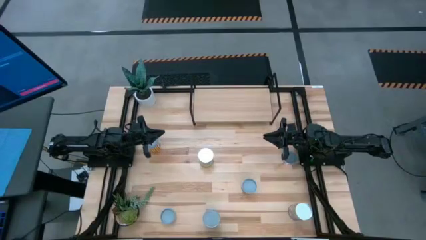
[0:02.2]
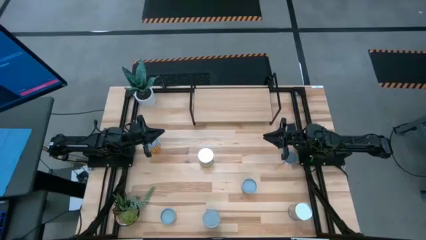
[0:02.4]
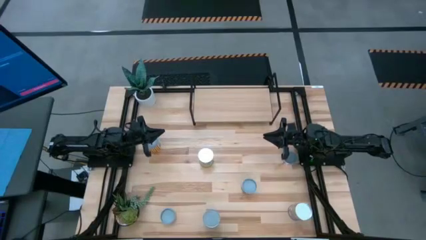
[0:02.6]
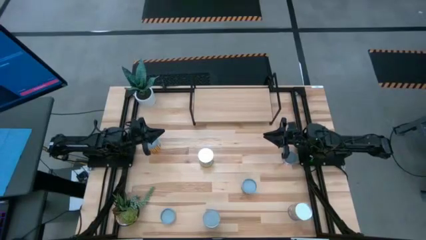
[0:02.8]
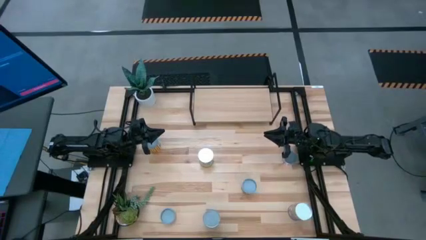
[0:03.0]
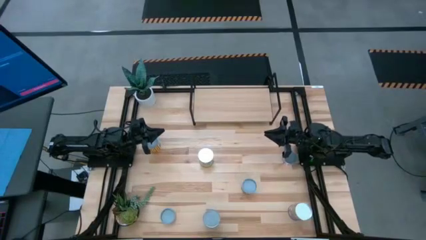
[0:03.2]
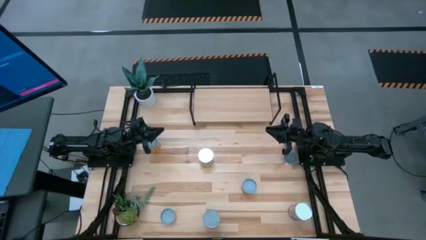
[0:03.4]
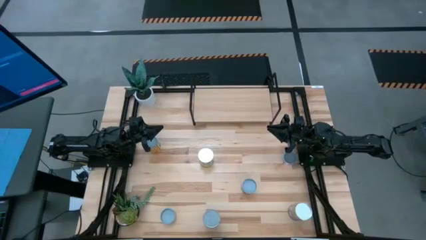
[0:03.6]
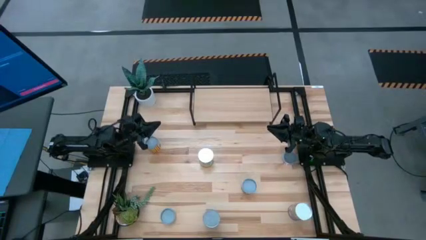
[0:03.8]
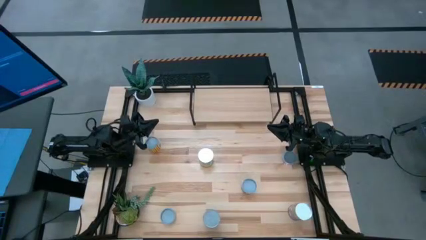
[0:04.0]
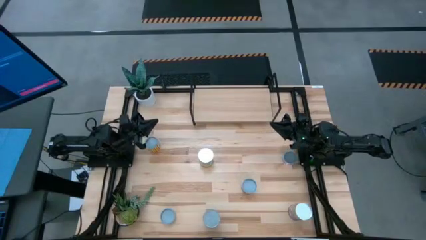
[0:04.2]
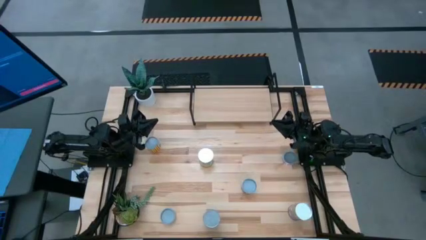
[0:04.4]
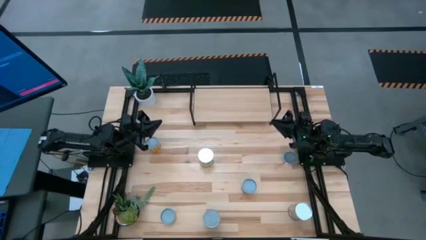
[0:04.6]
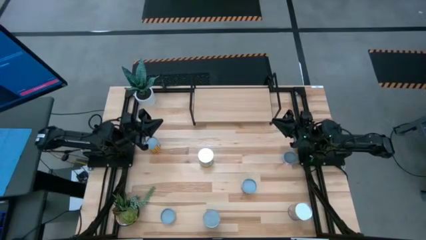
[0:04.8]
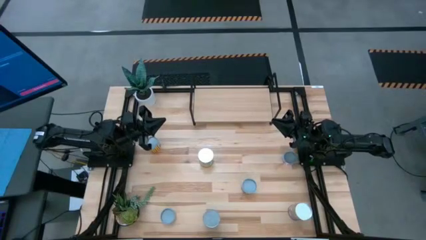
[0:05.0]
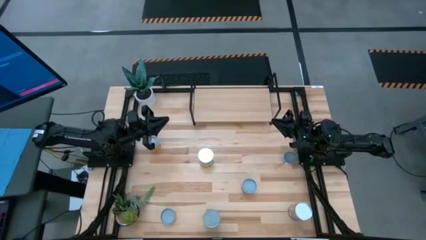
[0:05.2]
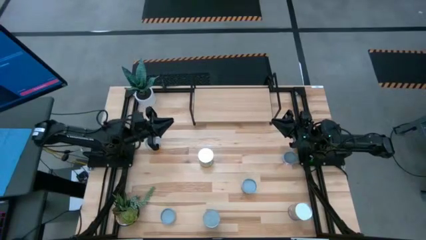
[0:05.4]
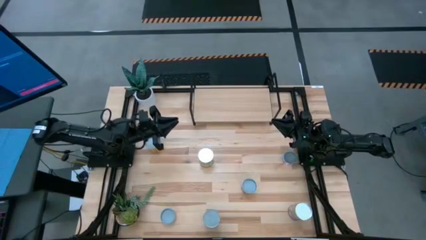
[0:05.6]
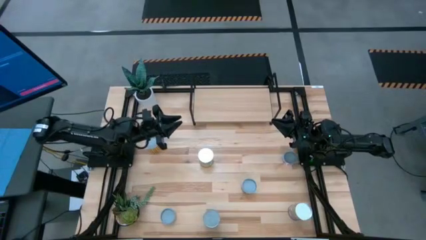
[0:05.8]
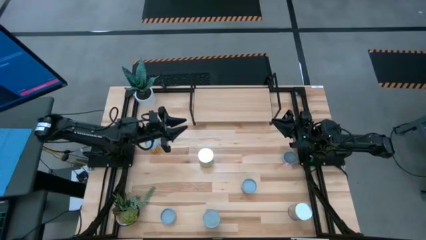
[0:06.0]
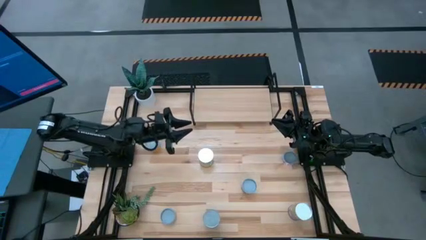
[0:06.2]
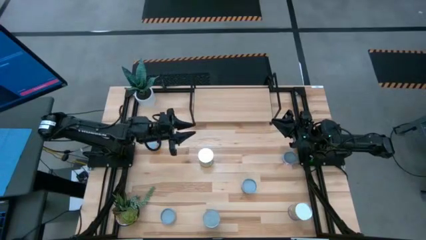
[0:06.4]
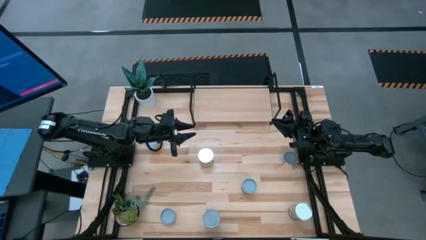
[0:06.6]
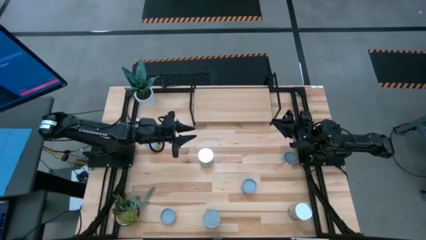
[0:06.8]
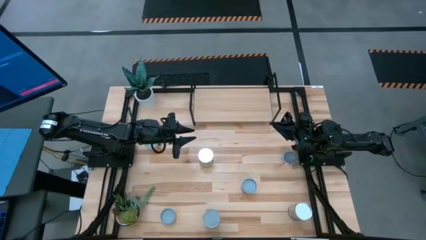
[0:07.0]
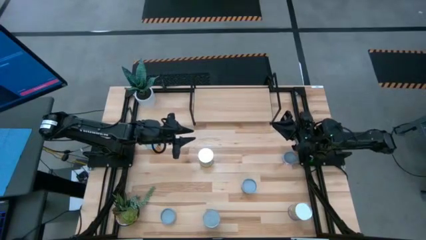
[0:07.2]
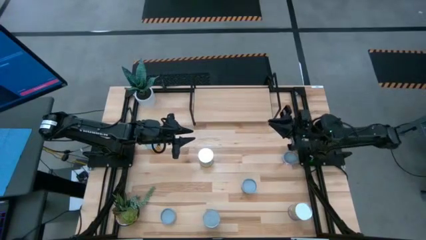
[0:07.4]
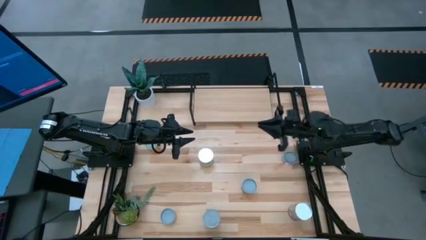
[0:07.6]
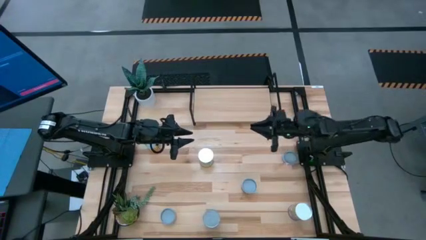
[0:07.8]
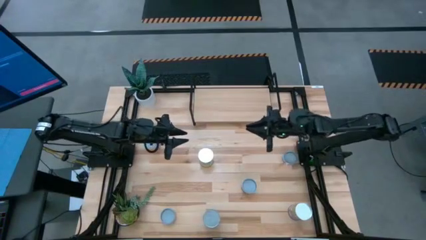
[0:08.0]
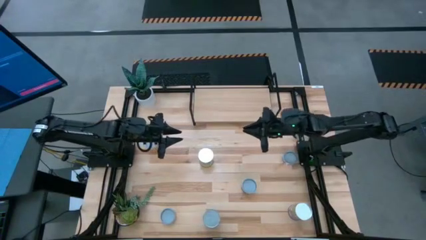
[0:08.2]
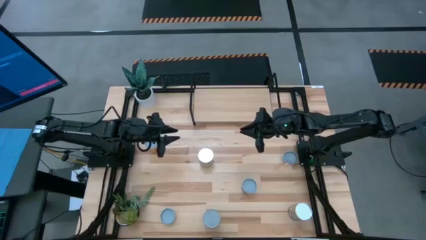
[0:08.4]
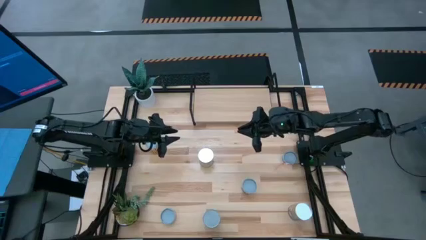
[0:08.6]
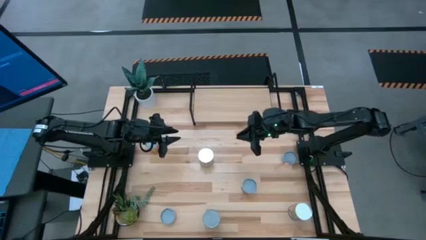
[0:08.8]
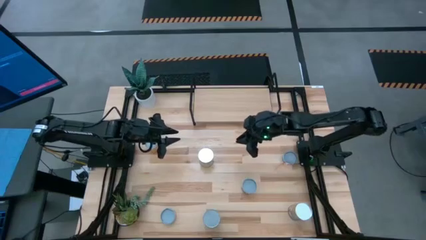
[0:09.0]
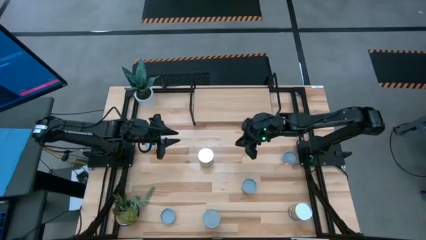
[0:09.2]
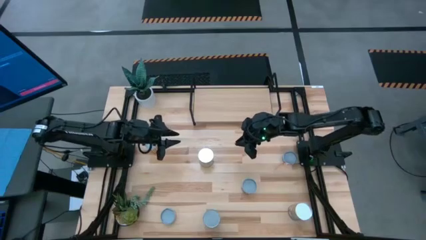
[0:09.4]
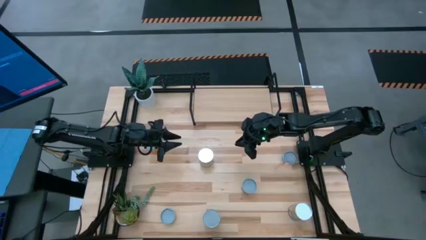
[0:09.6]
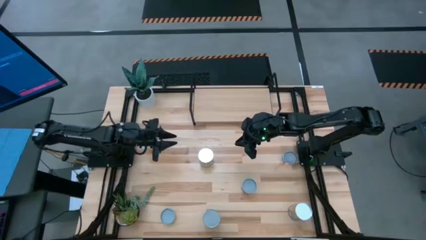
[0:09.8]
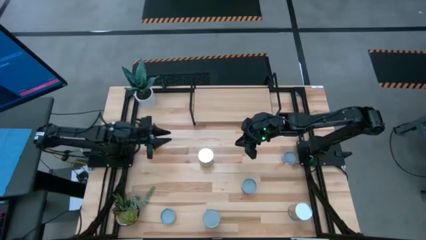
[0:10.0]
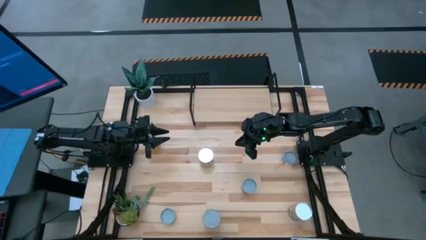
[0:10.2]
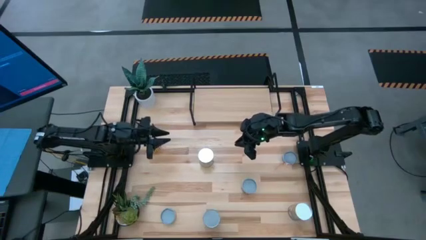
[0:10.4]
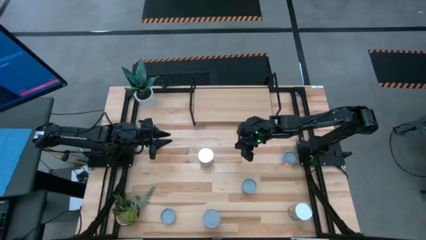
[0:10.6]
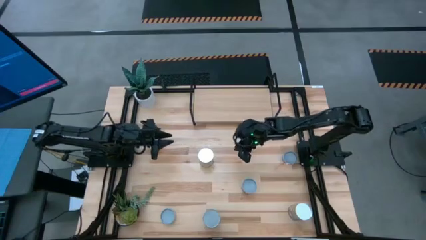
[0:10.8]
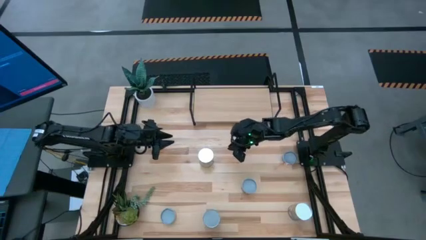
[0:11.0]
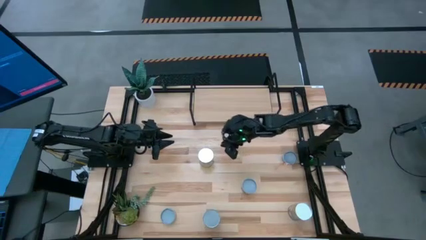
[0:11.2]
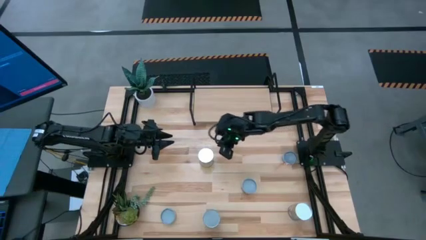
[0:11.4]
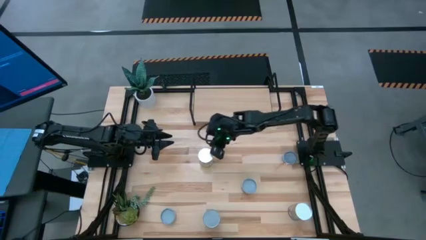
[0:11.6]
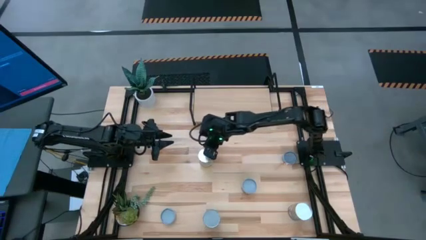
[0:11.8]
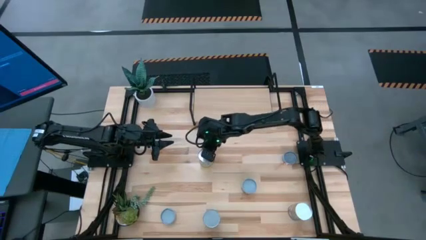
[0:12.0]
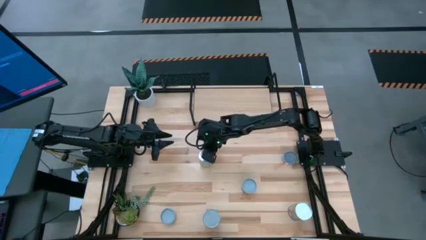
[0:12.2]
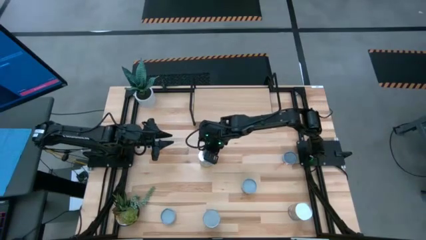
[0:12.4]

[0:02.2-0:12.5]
Task: Pick and place cans onto a shelf
Put the canned carrots on the shelf

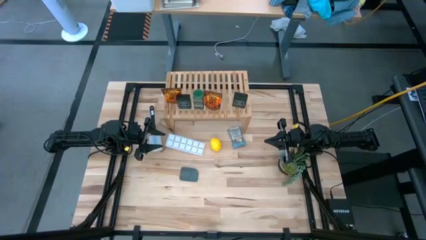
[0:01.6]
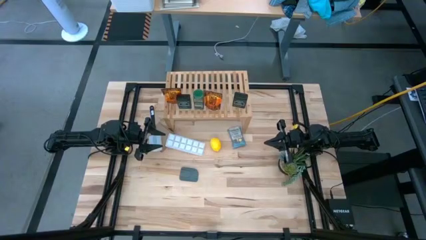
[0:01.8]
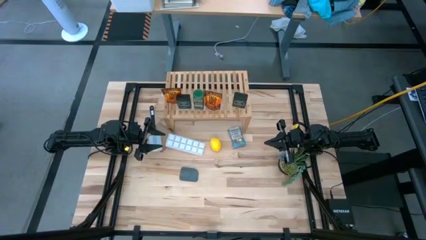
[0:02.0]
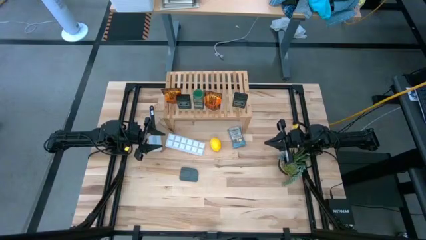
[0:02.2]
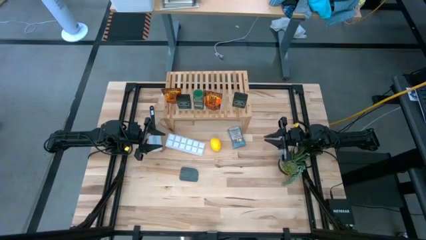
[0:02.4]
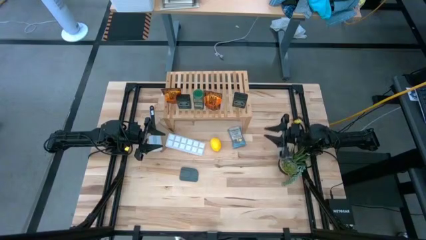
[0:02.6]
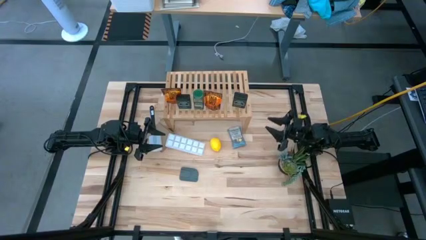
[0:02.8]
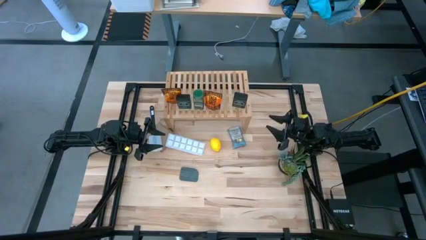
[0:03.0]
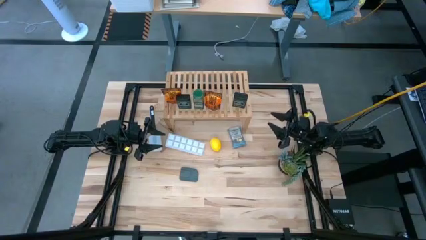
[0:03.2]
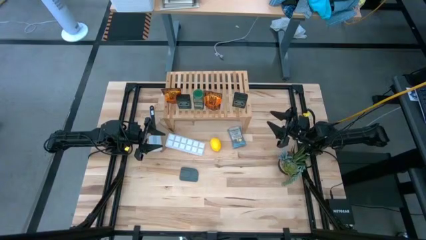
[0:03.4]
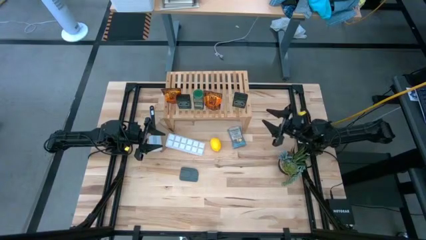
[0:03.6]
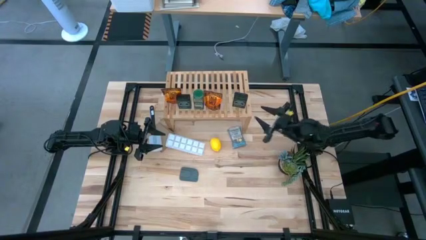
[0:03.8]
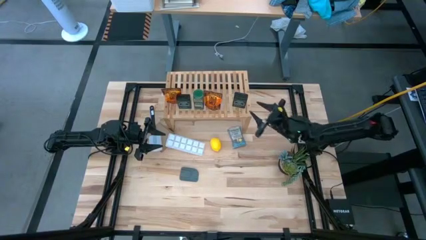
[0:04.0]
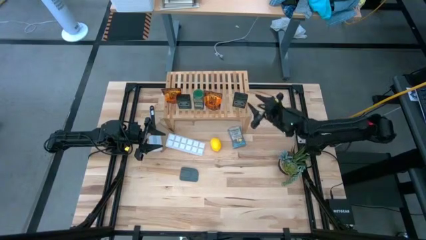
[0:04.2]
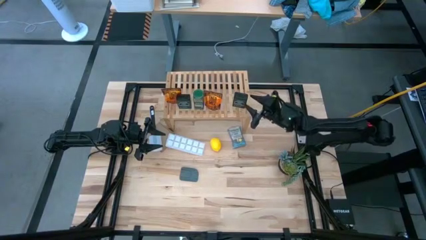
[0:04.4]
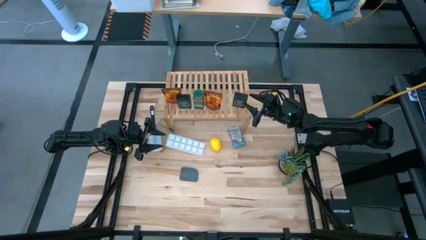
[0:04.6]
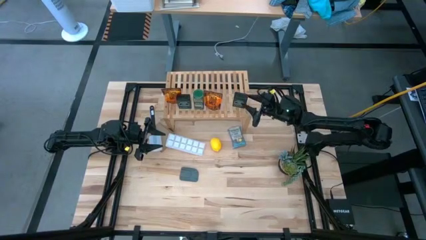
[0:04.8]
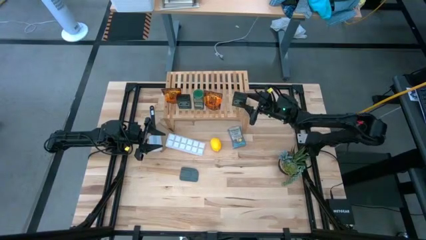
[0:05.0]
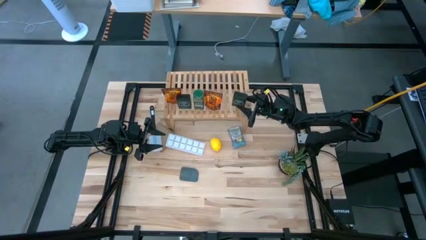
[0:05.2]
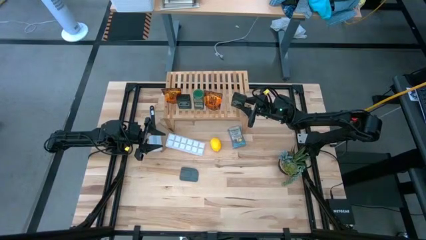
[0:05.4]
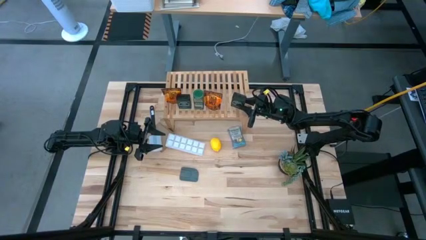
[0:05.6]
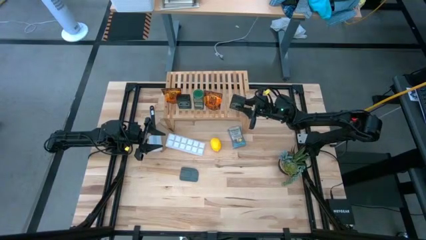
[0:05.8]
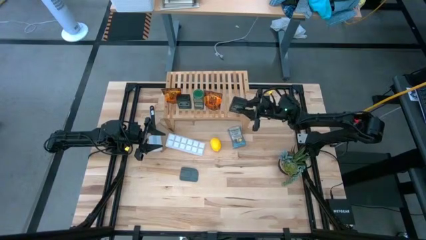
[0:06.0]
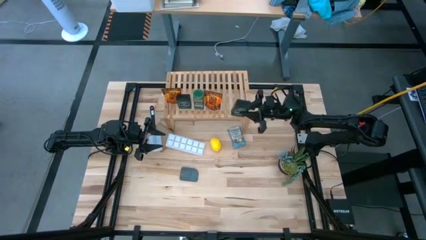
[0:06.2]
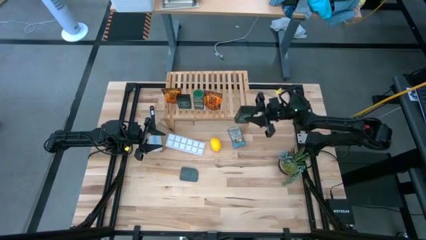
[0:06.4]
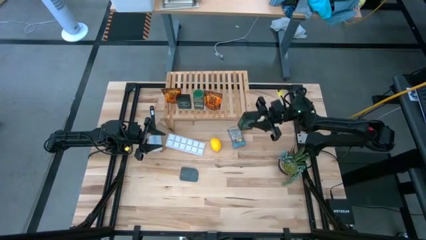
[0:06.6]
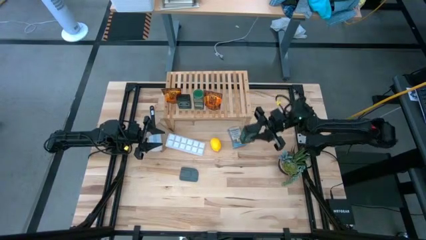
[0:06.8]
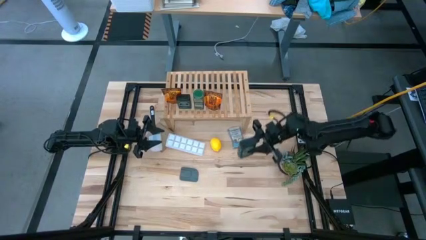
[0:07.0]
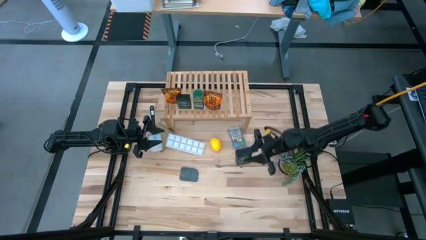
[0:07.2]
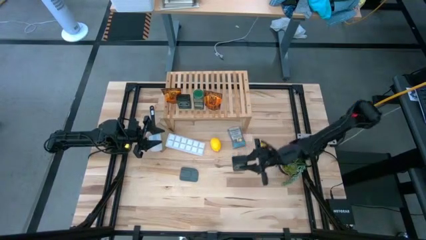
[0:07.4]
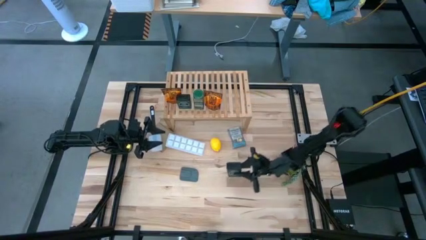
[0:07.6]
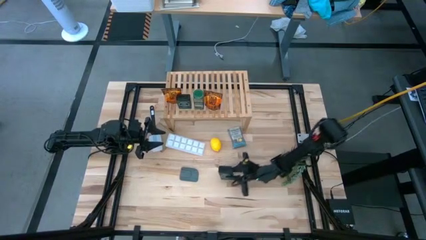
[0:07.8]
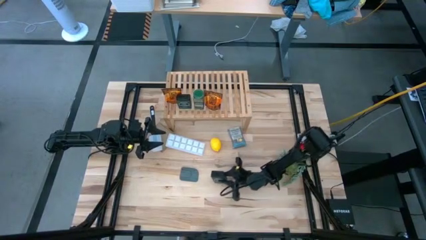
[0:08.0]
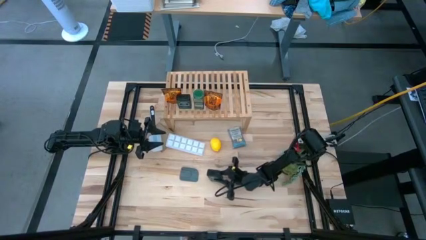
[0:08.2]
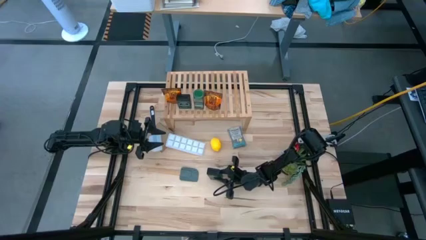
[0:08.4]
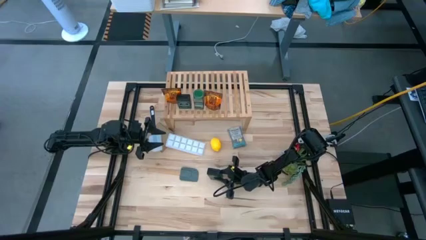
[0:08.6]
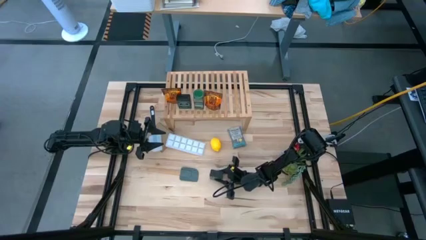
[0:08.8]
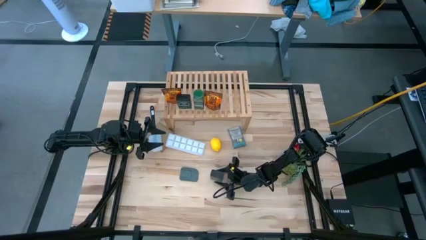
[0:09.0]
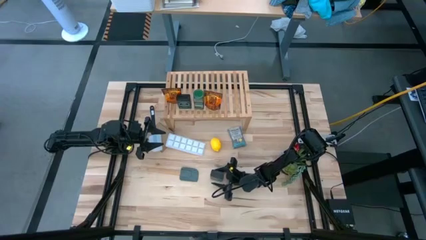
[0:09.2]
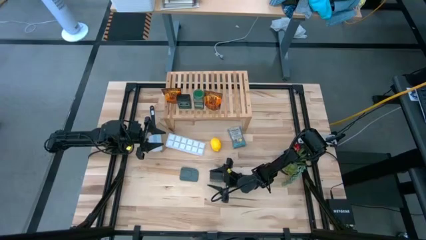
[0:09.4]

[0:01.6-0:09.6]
Task: Shelf spices
Remove the right green seasoning can from the shelf
